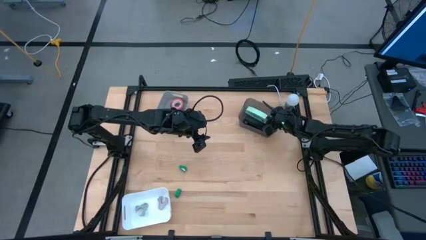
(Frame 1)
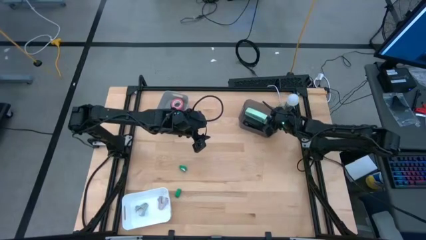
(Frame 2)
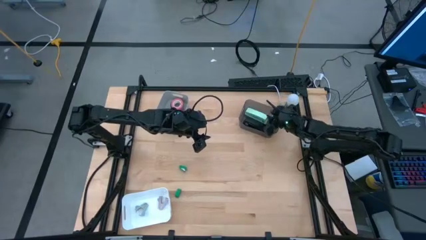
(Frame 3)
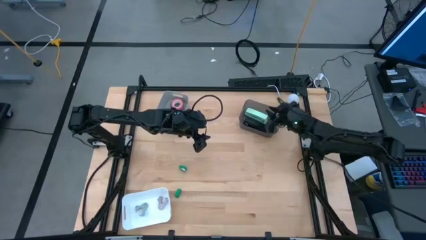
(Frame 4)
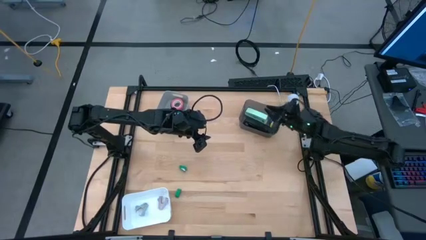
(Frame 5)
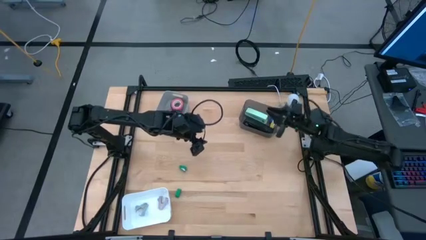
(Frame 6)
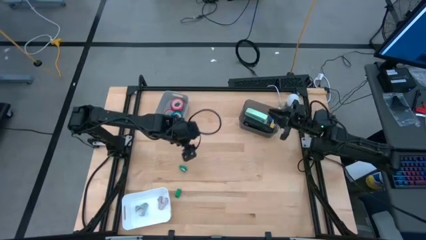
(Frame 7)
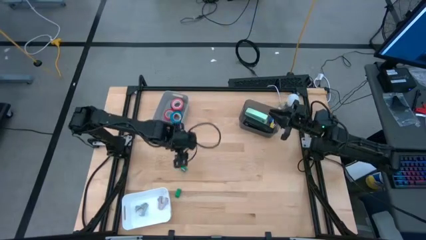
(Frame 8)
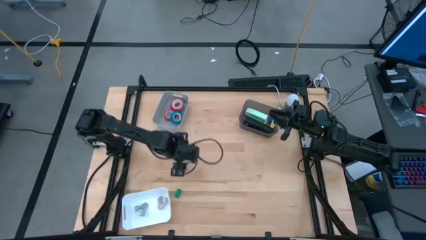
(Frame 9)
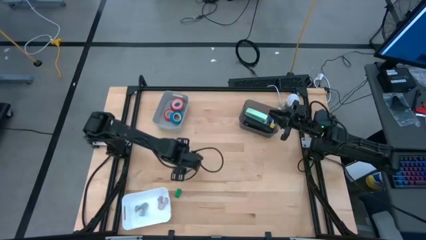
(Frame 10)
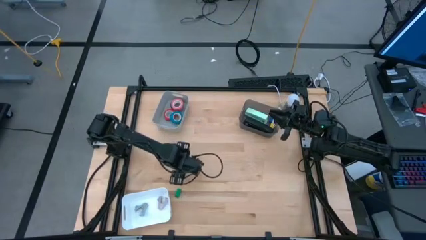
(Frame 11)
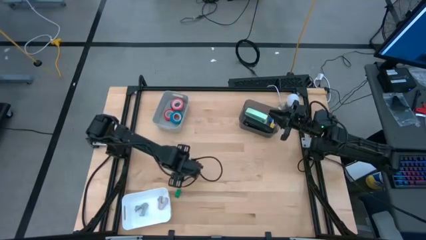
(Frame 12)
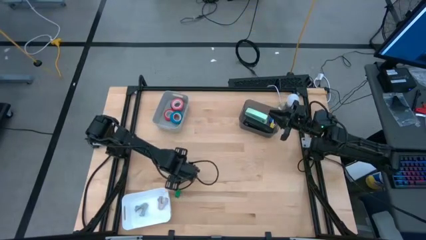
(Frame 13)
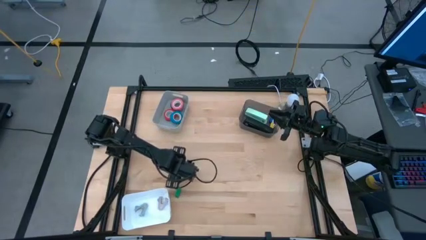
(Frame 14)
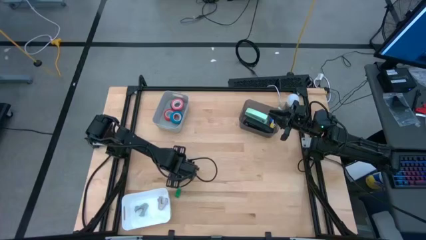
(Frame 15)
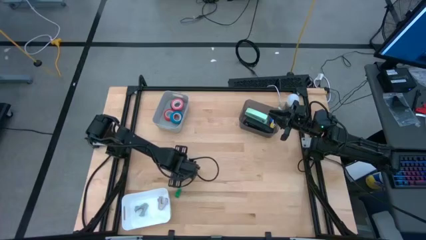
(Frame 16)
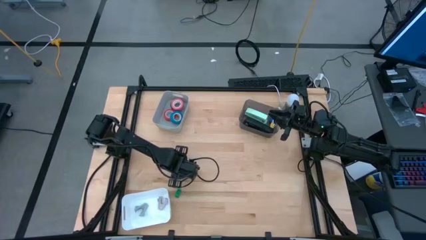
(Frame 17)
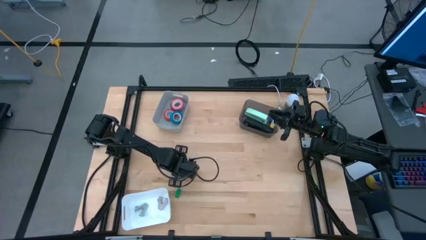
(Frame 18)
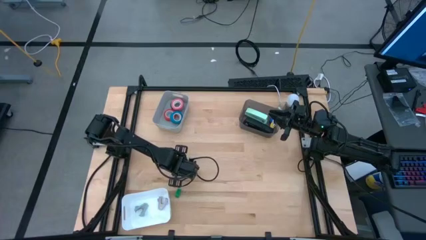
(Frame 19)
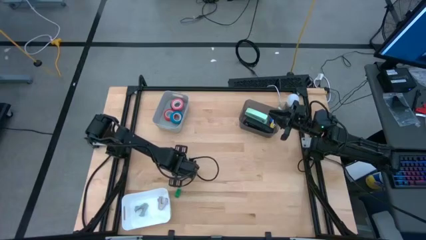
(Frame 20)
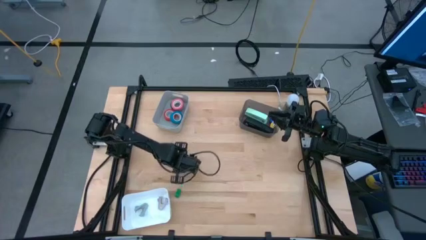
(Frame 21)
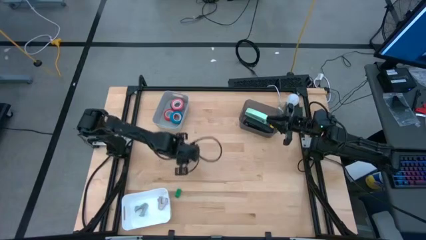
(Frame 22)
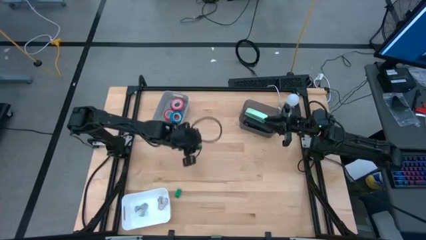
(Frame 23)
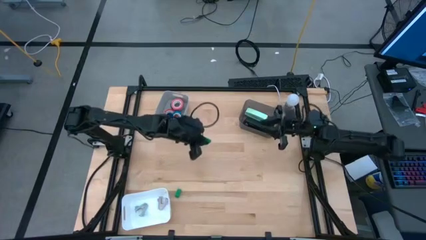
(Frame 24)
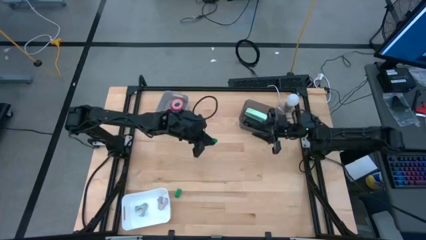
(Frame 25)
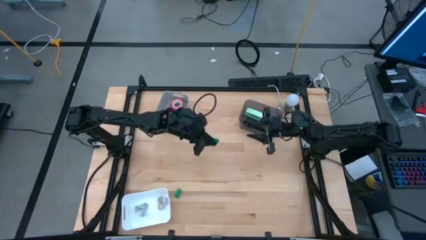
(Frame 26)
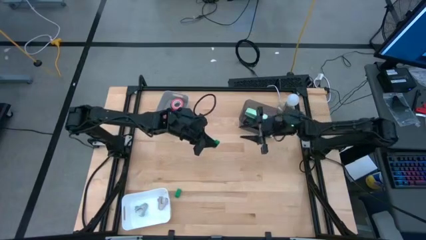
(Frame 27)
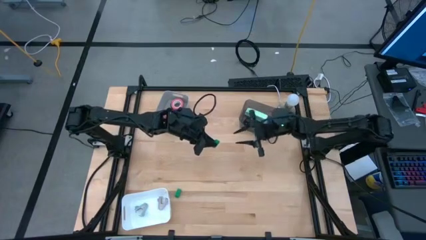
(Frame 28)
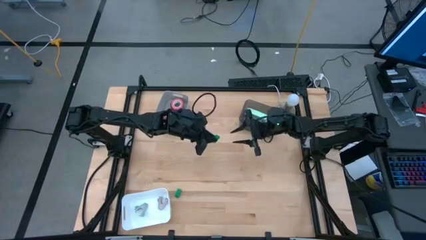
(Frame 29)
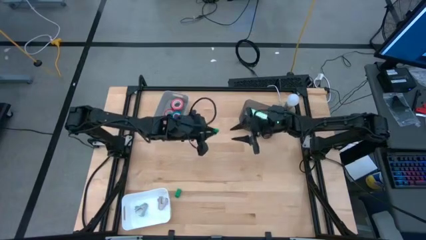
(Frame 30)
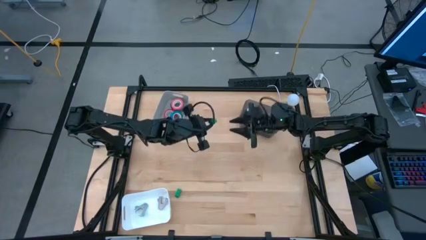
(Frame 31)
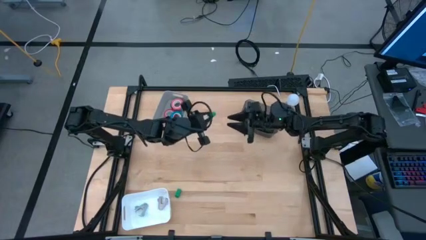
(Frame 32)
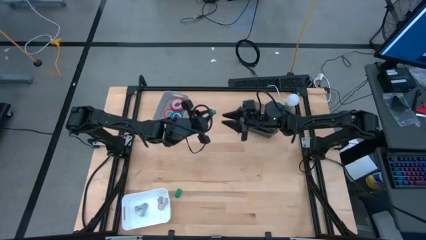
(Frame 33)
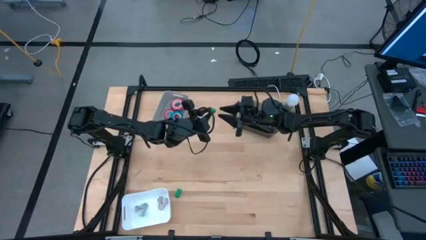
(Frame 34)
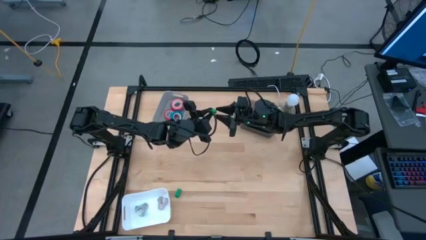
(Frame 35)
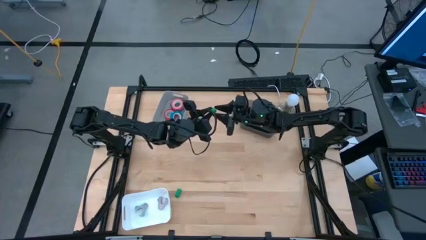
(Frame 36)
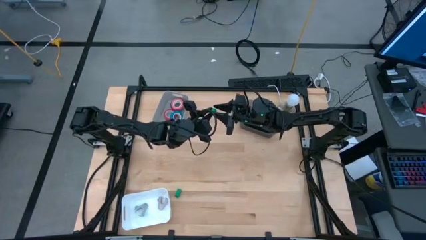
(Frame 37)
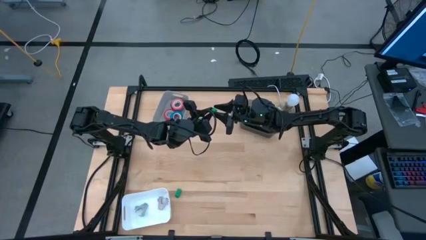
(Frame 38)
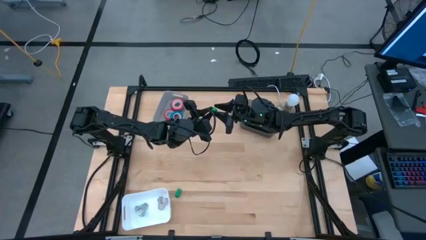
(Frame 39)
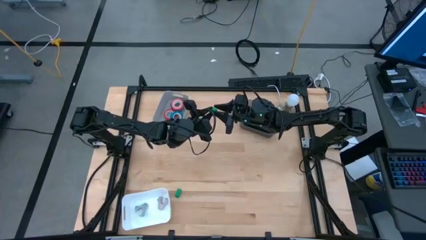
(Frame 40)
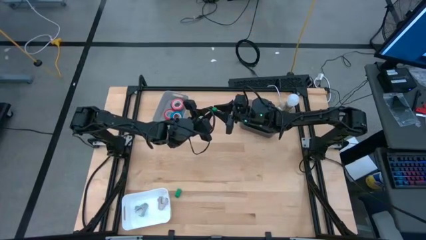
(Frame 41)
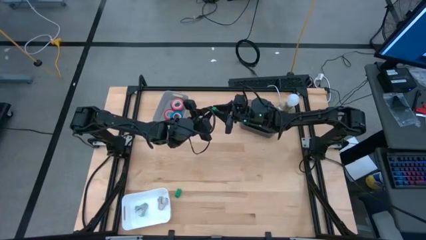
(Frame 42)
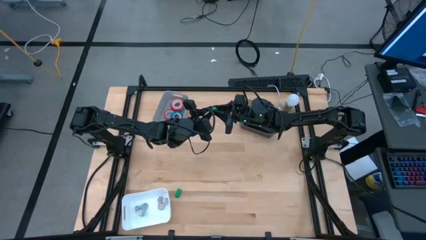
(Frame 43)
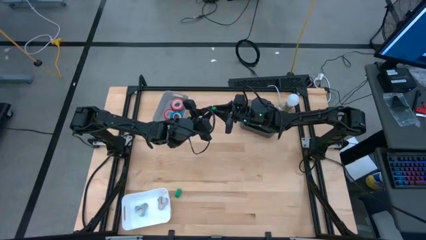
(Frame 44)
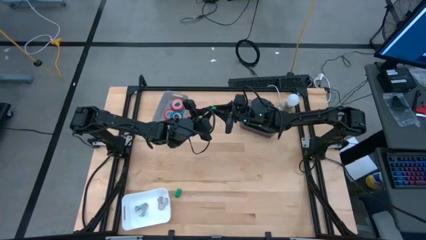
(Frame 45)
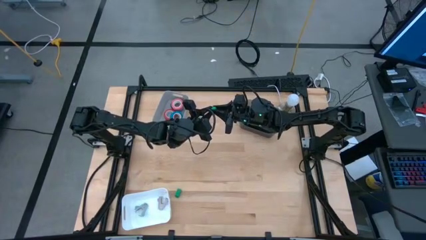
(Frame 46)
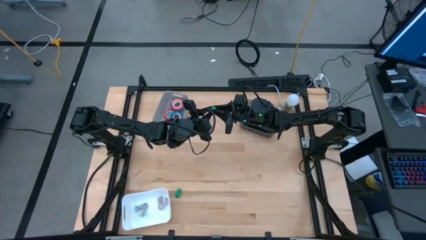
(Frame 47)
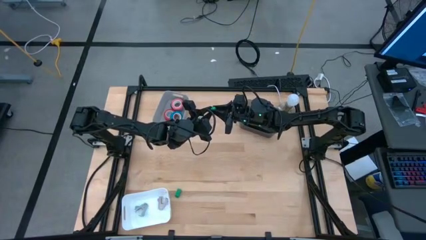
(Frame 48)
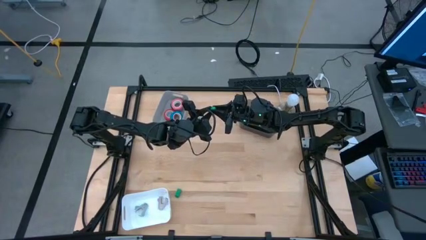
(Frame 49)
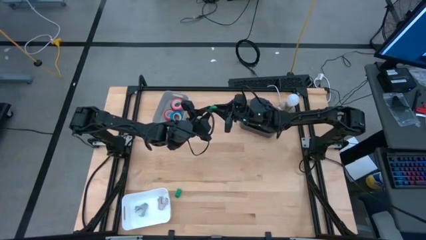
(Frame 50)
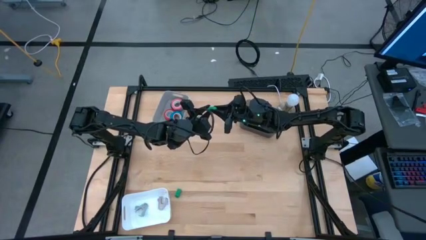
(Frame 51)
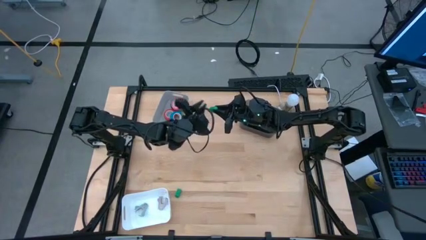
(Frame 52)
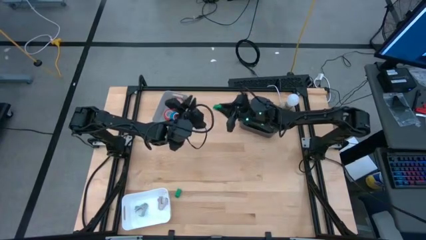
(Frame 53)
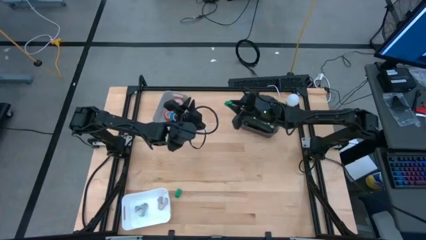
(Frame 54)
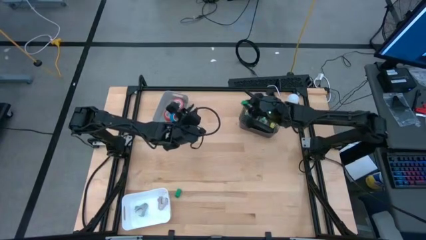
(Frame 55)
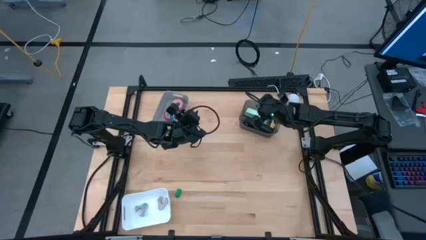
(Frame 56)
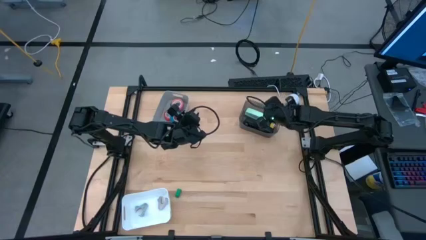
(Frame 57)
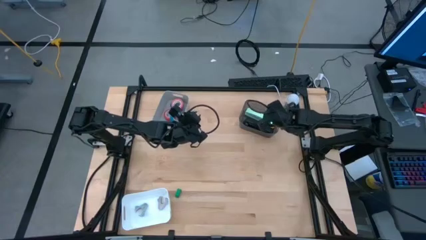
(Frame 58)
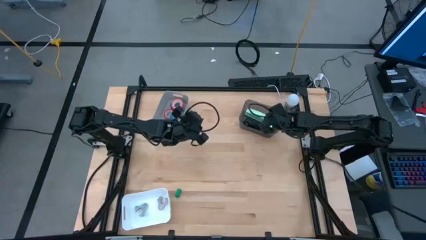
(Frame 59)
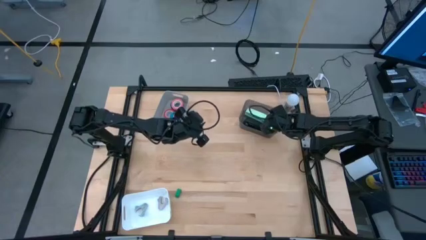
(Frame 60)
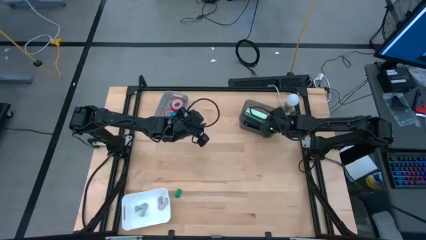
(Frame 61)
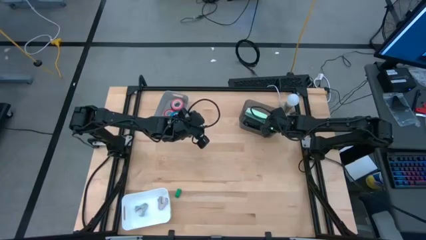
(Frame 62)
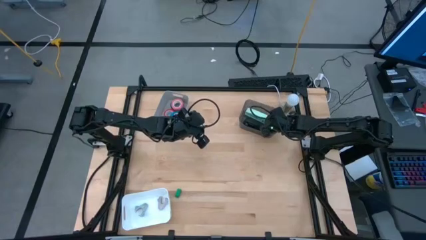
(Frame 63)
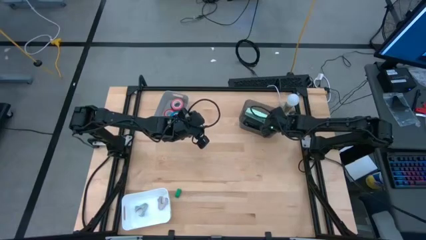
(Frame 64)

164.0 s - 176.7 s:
Task: Pick and place Stapler, Stapler remover, tape
Put the top green stapler into the black bin

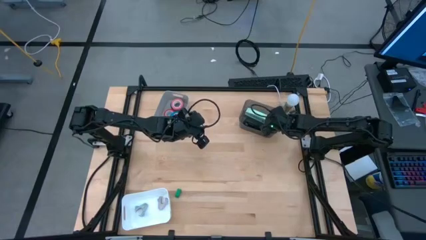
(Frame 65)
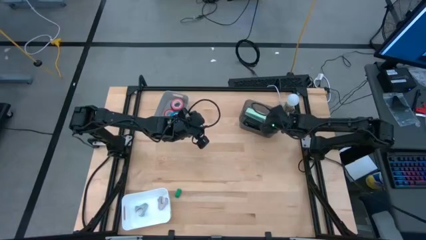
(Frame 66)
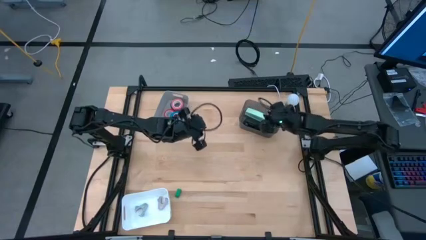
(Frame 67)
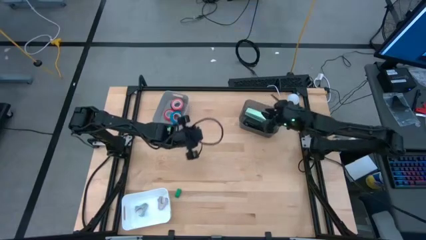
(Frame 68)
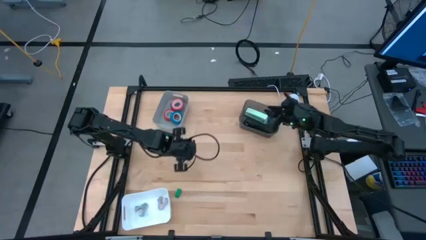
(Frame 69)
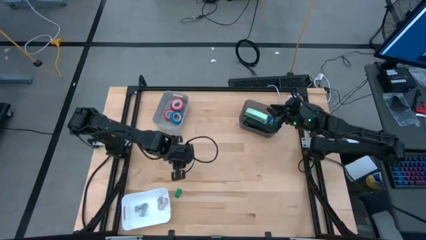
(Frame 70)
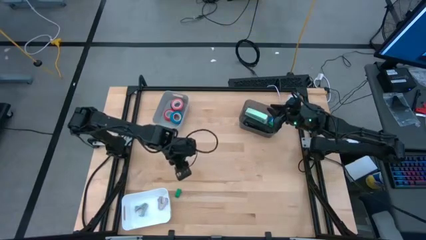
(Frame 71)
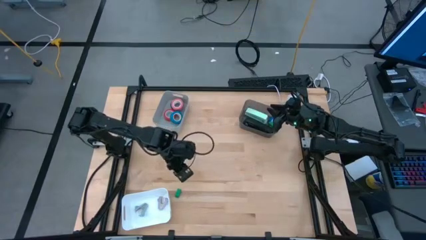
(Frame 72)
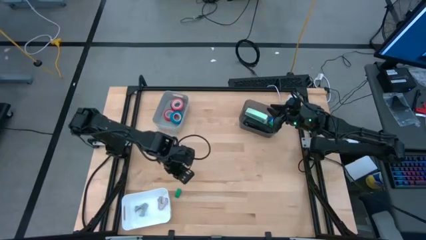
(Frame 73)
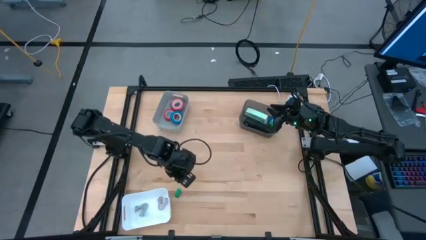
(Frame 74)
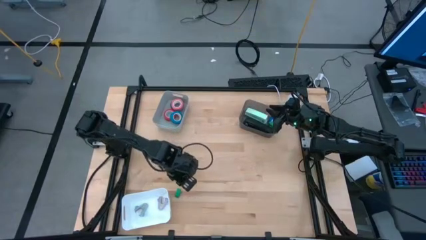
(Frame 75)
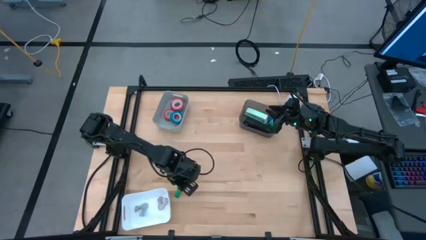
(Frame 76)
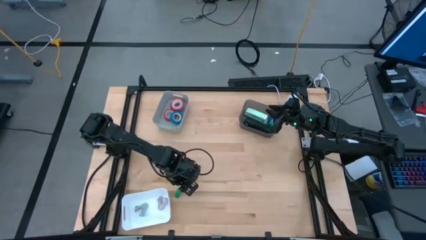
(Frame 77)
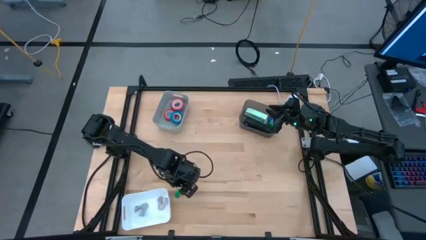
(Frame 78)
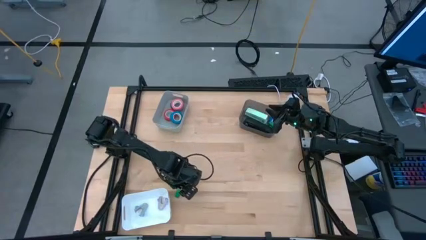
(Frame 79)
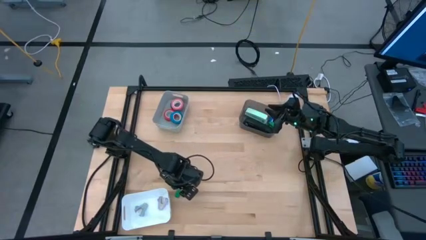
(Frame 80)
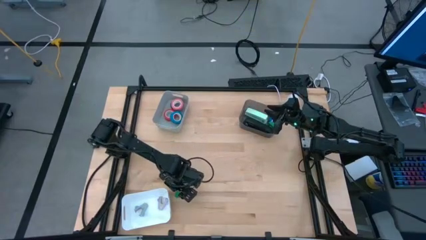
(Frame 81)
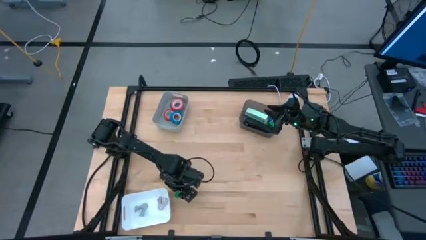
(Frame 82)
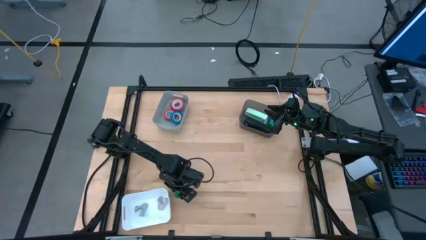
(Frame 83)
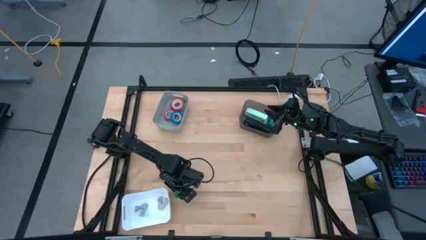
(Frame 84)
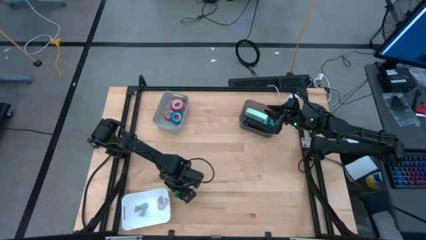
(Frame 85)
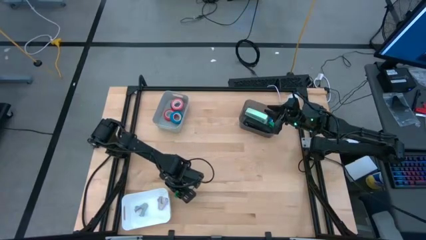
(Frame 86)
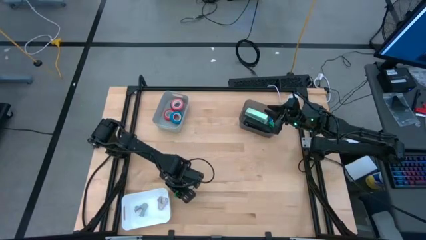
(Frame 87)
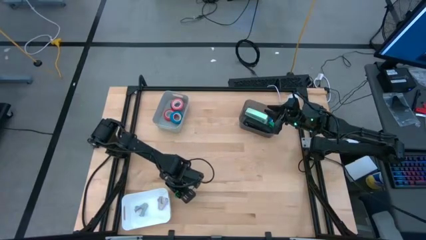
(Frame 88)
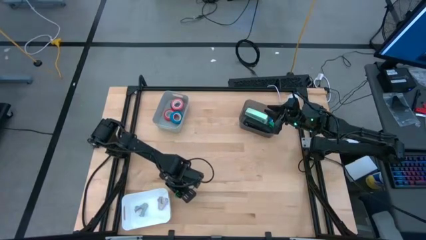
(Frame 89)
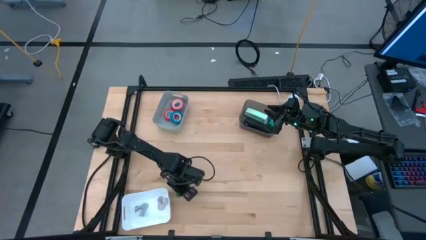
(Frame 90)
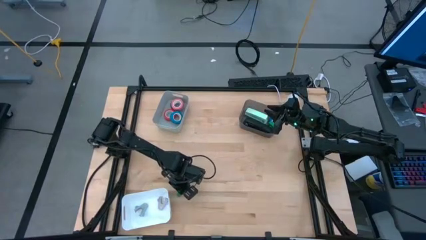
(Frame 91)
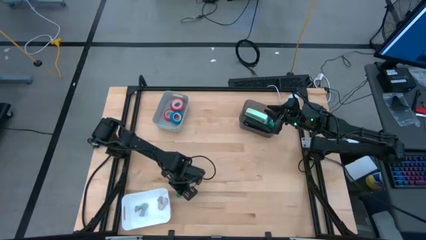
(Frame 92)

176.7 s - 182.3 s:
Put the green stapler into the black bin
